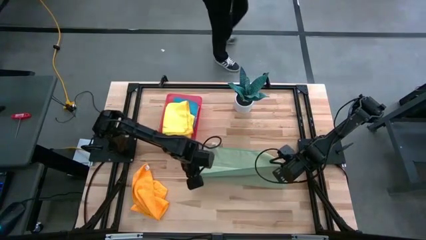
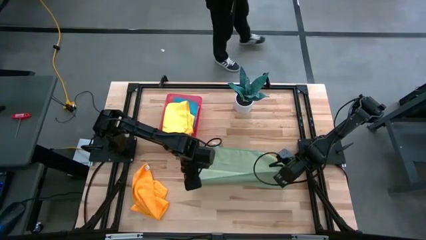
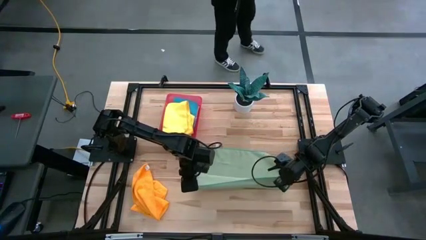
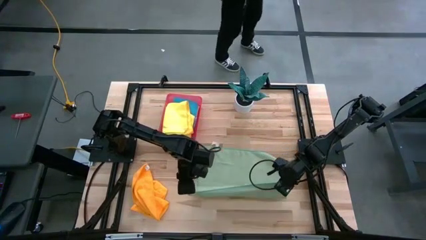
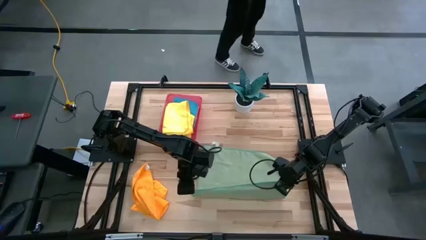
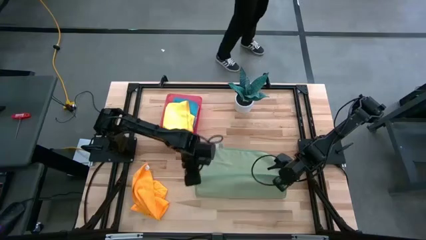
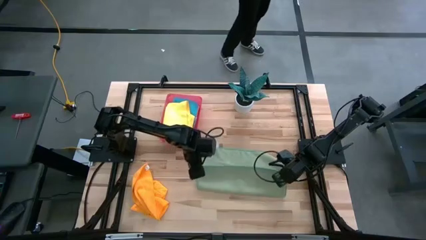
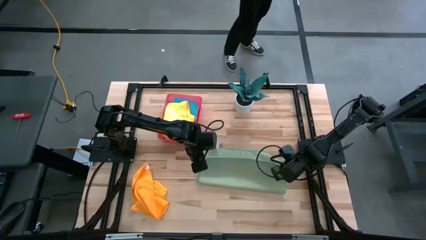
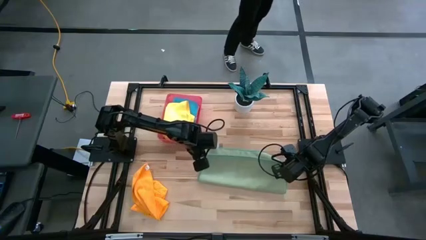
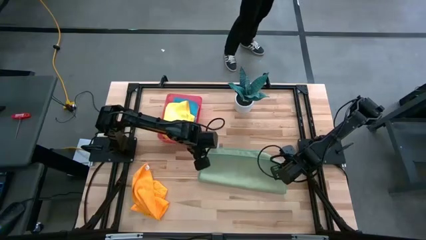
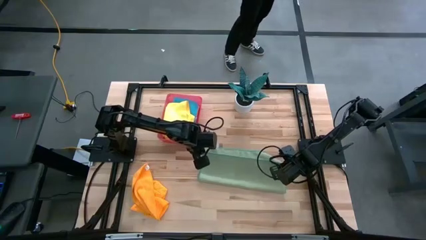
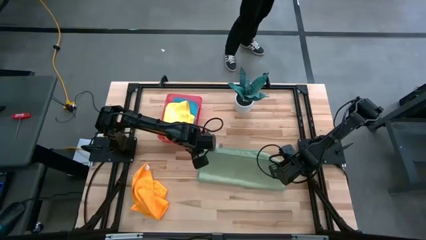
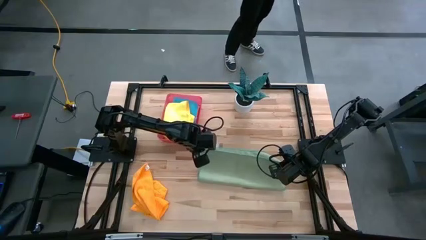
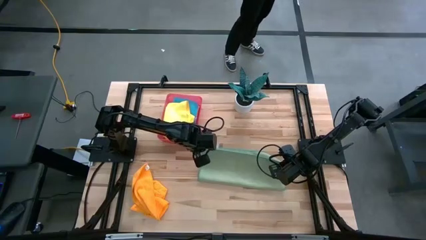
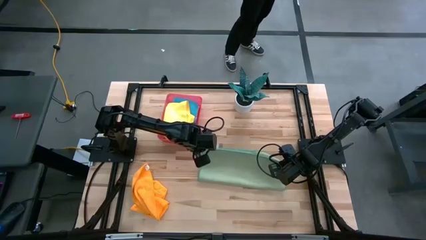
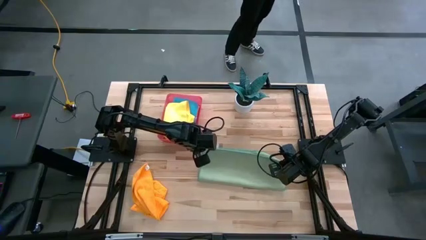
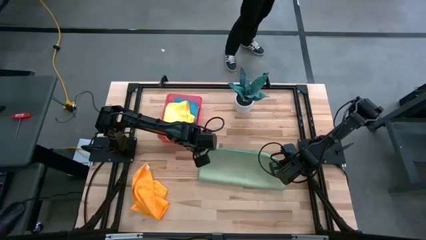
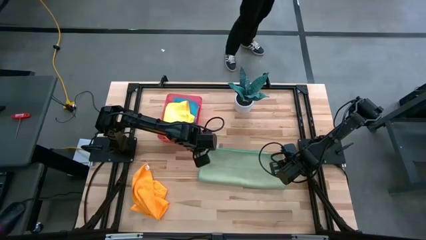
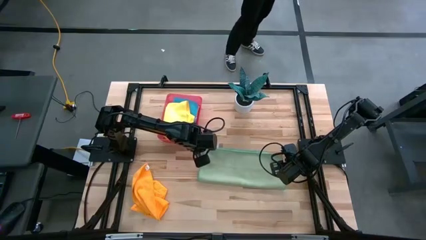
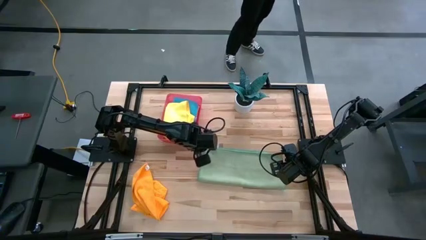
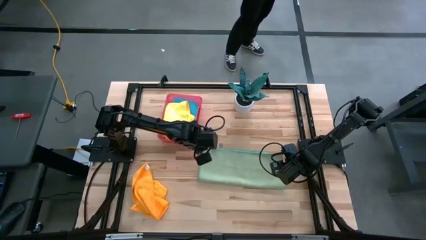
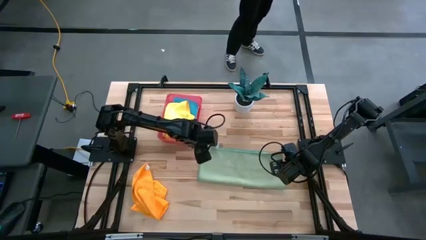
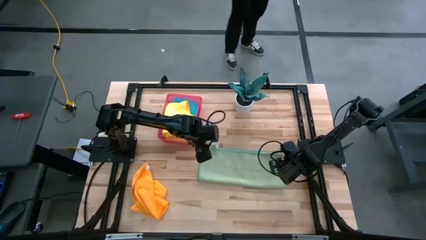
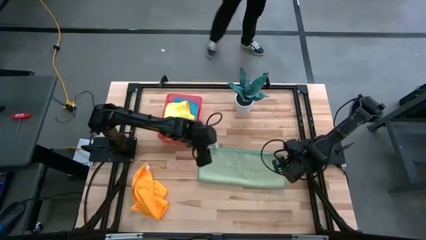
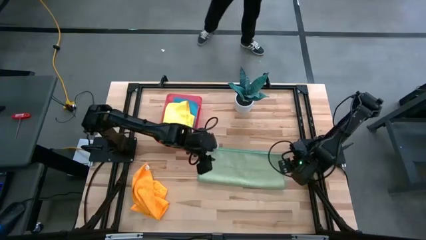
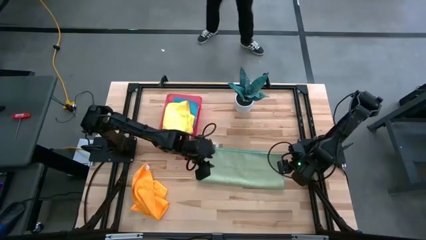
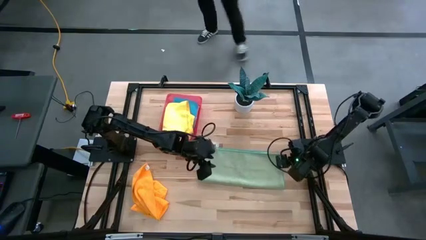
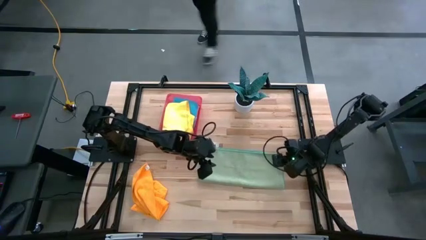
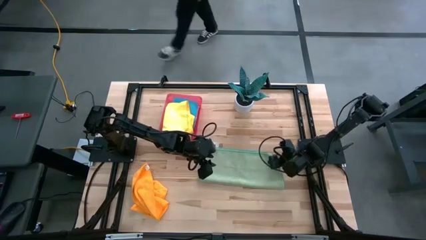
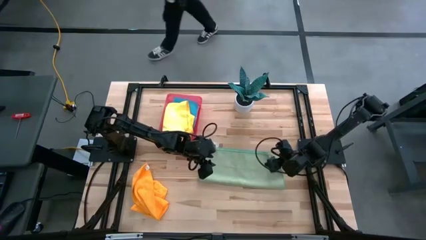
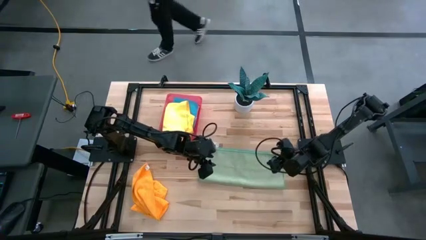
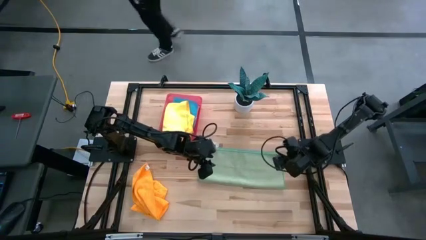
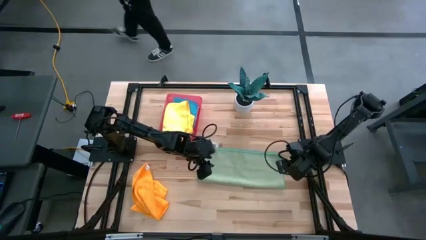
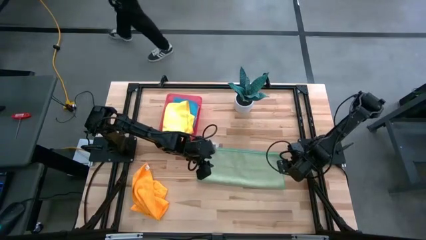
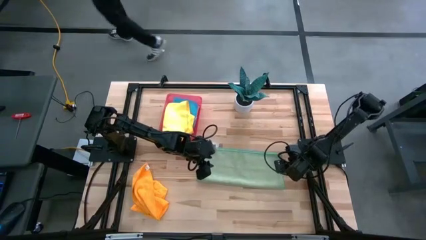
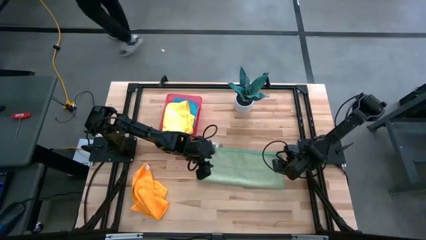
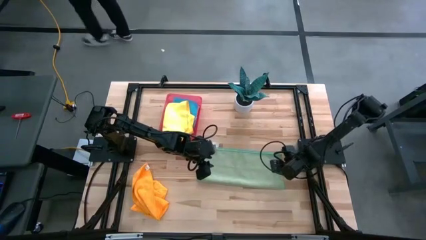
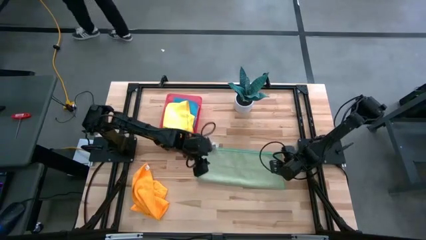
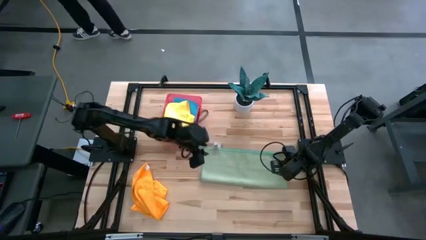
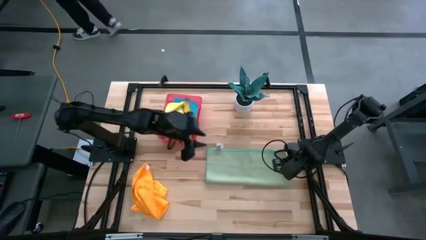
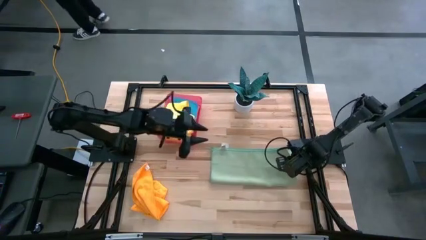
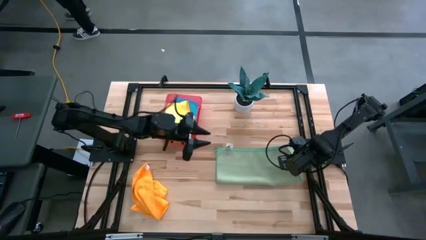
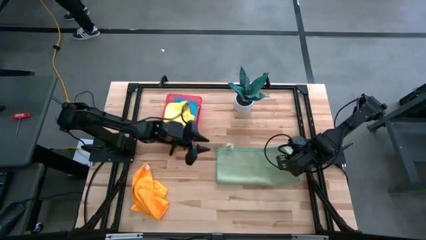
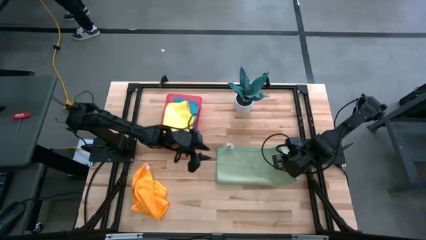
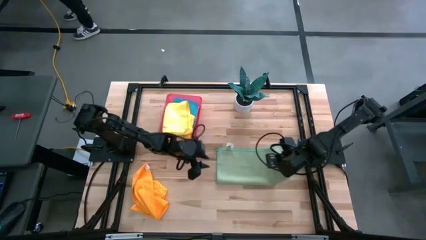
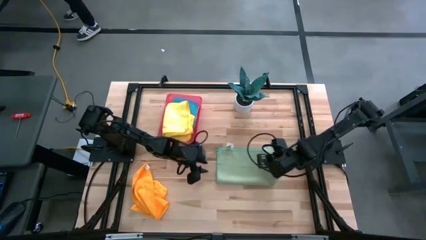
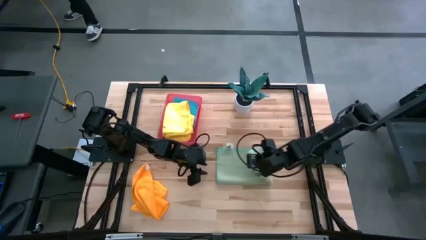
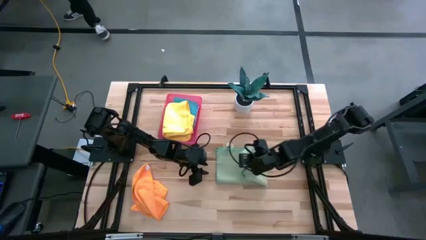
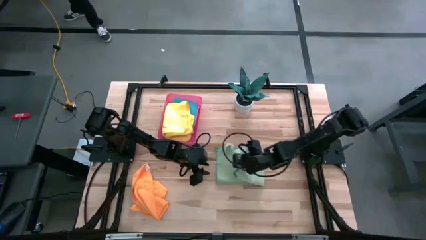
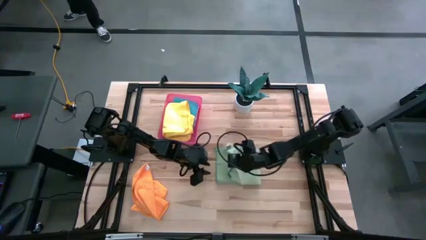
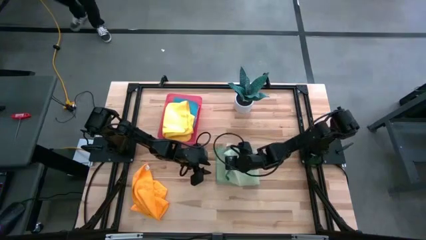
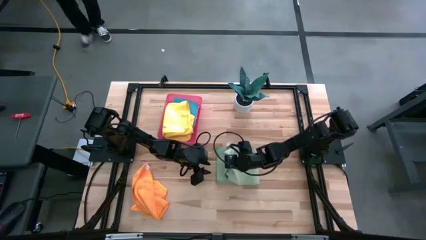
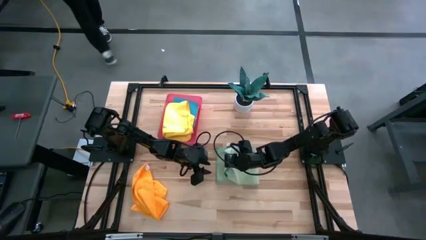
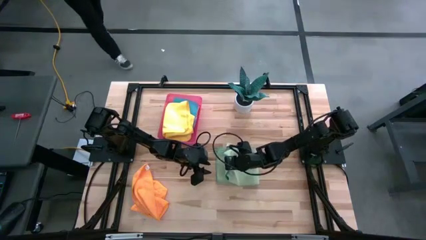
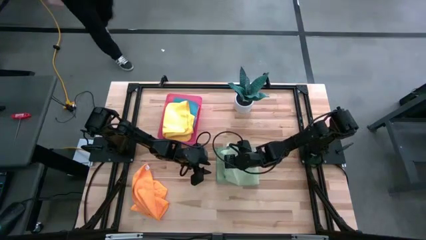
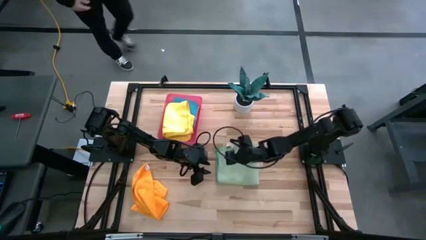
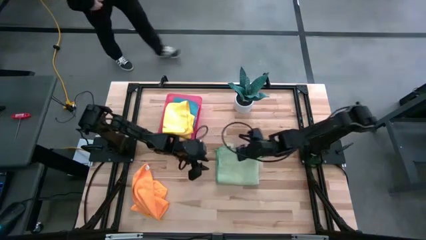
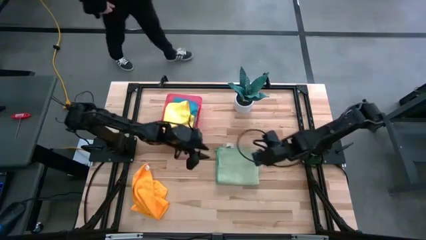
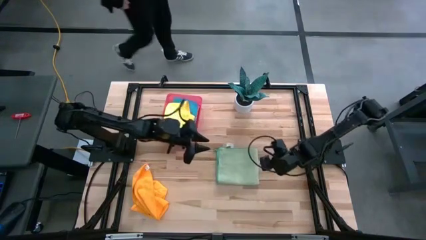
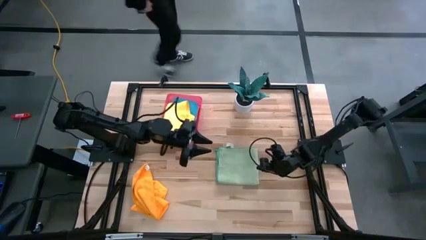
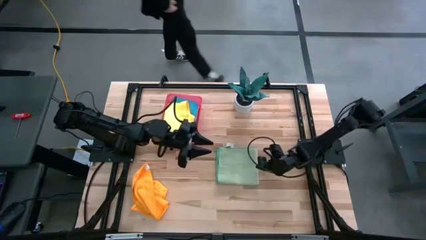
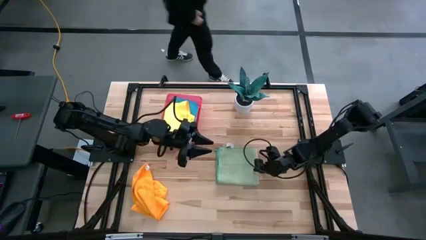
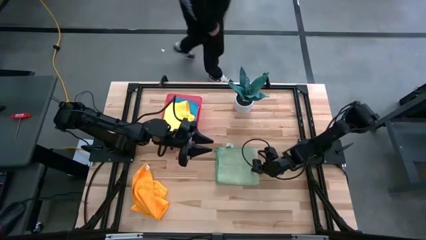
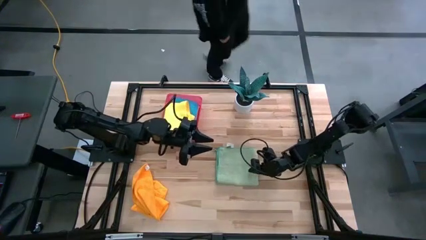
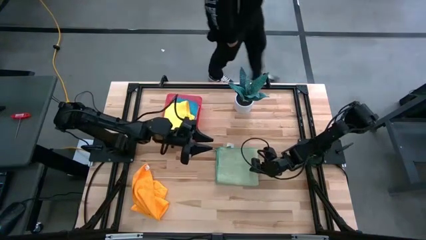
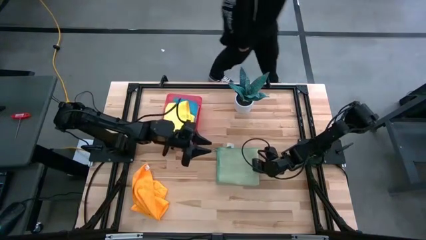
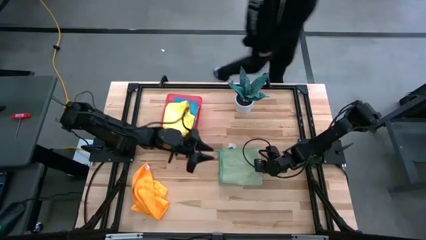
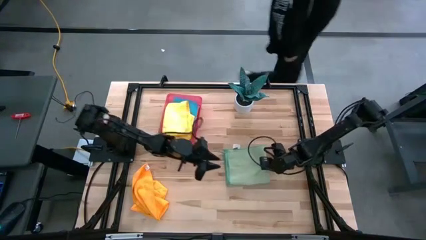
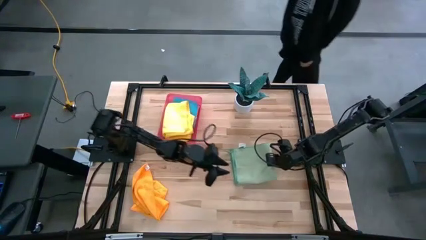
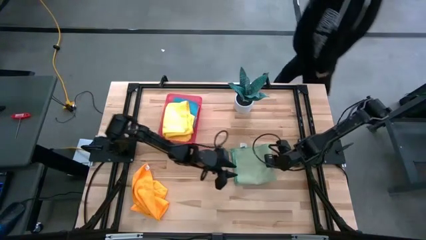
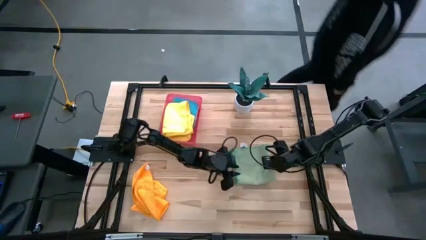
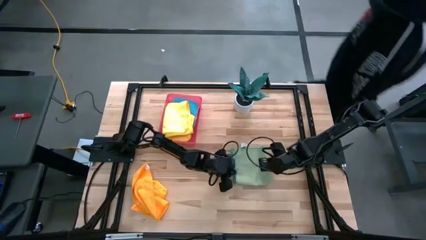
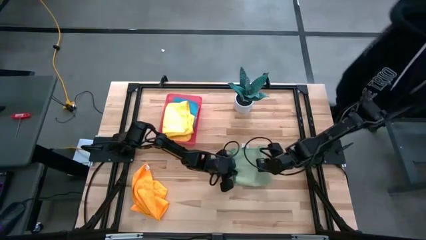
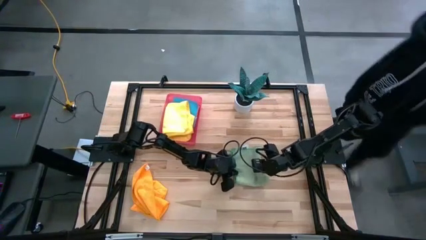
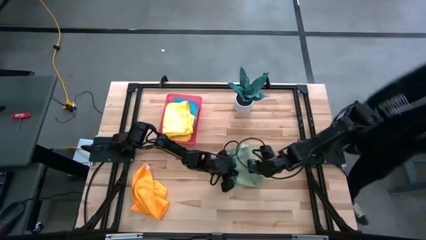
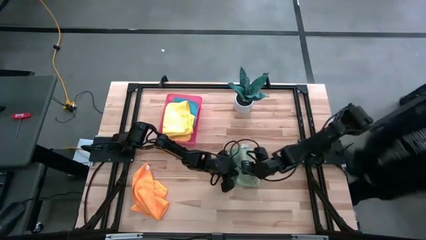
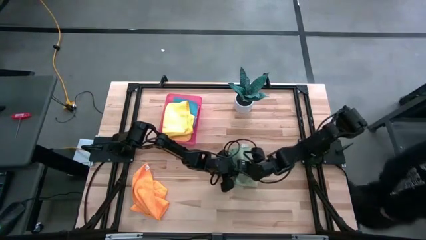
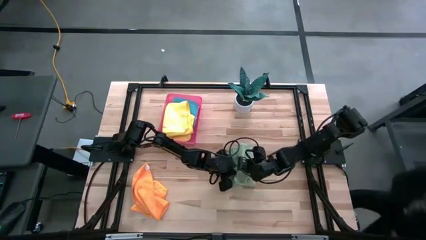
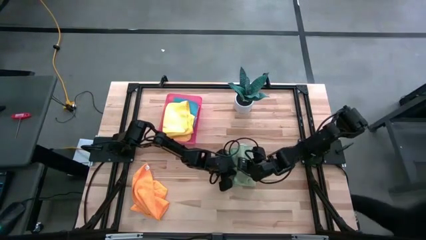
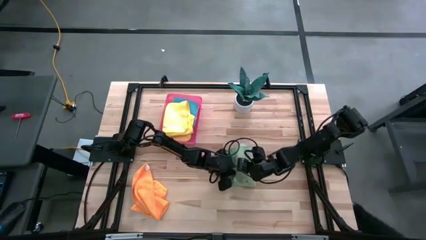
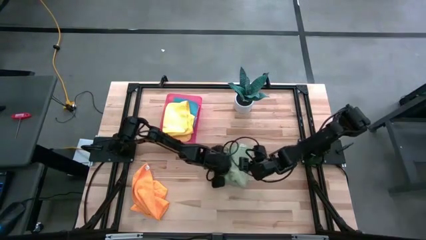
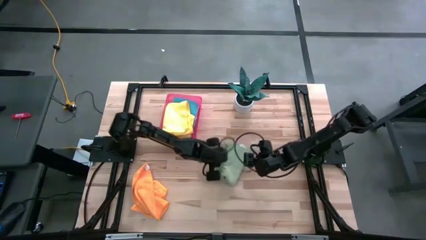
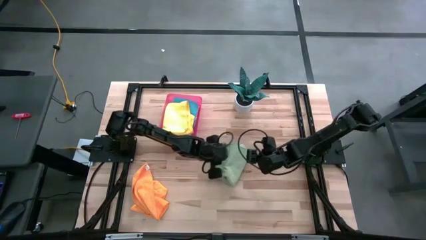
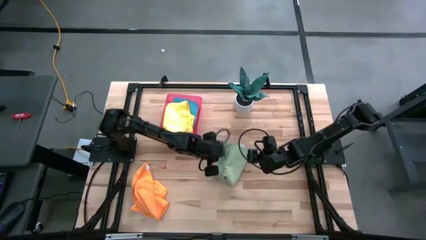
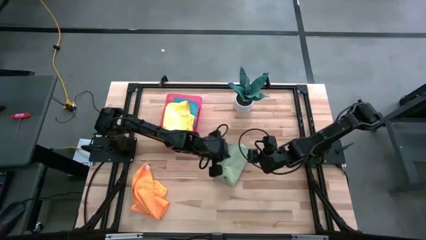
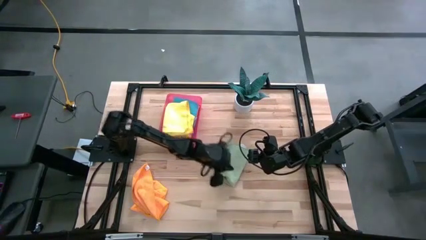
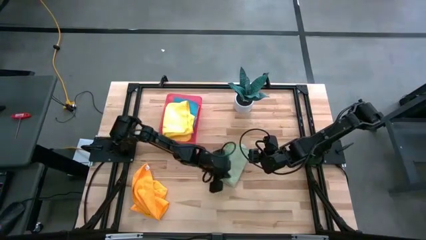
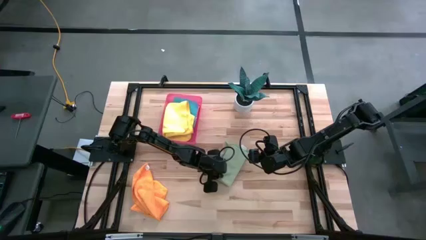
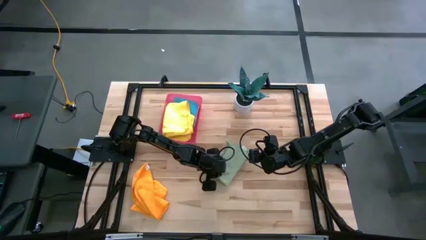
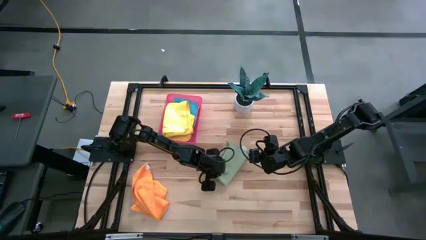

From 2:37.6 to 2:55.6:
Task: Fold microfiber towels
Fold the green microfiber towel
